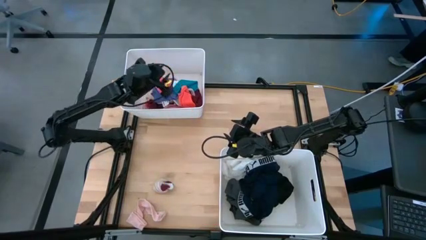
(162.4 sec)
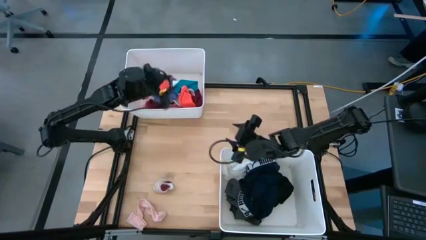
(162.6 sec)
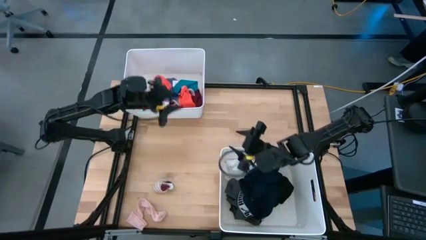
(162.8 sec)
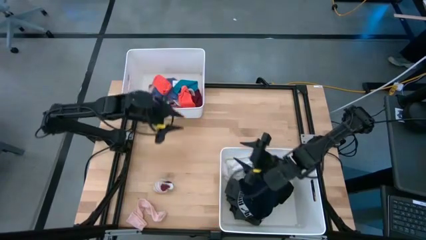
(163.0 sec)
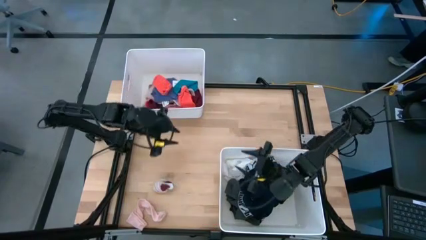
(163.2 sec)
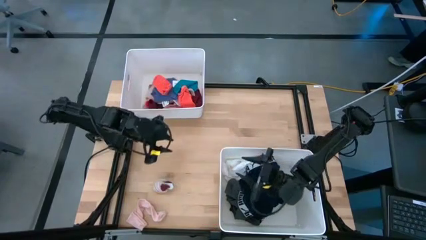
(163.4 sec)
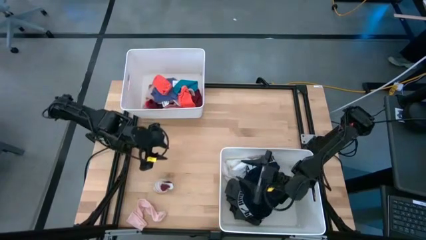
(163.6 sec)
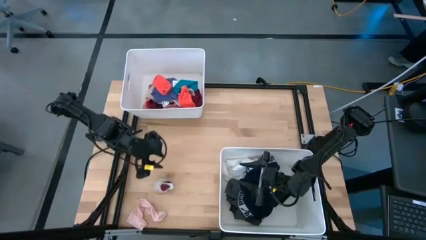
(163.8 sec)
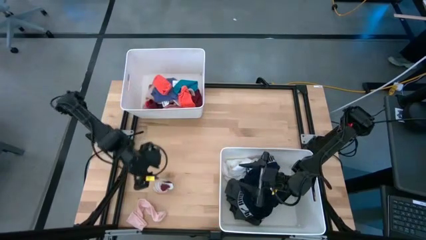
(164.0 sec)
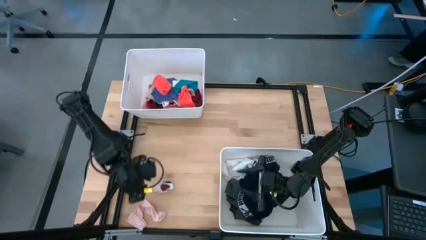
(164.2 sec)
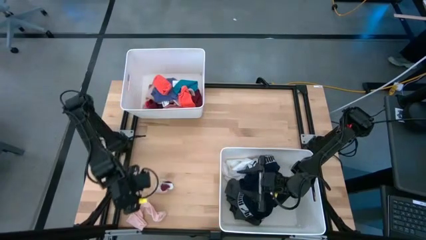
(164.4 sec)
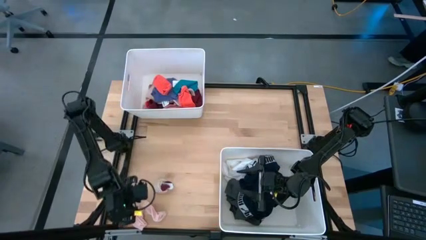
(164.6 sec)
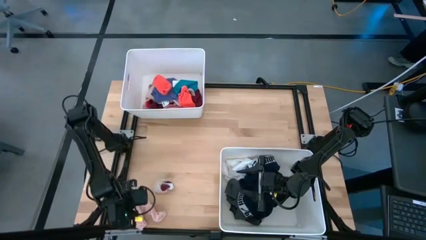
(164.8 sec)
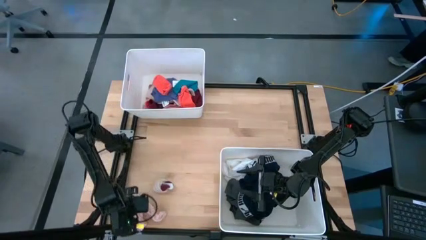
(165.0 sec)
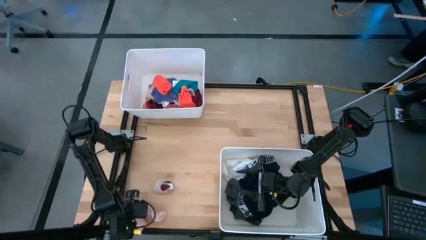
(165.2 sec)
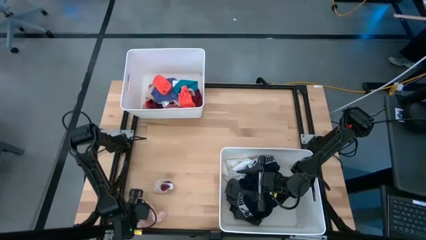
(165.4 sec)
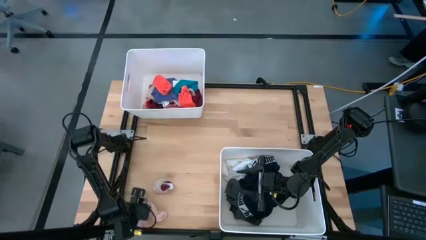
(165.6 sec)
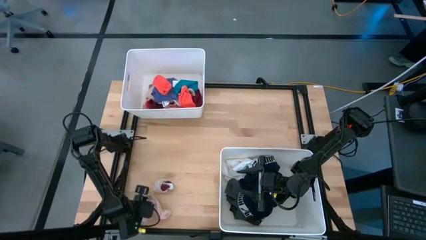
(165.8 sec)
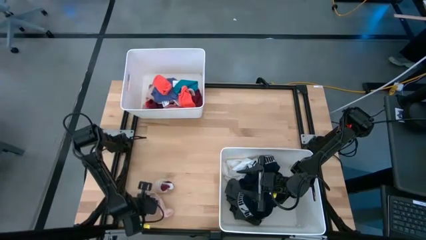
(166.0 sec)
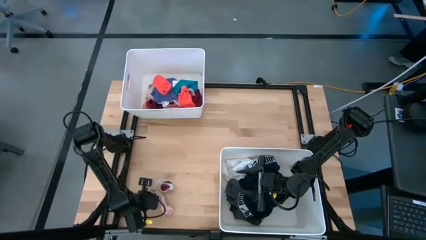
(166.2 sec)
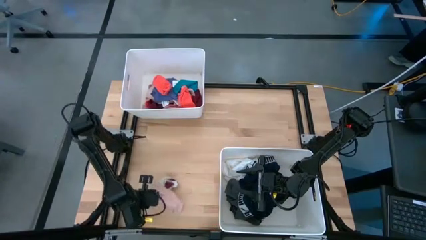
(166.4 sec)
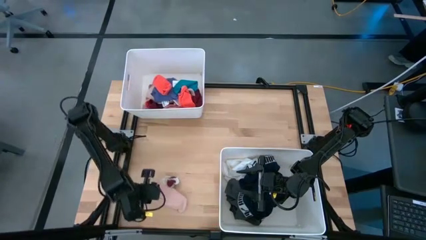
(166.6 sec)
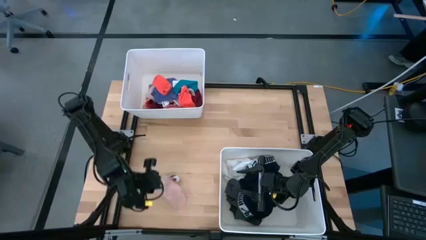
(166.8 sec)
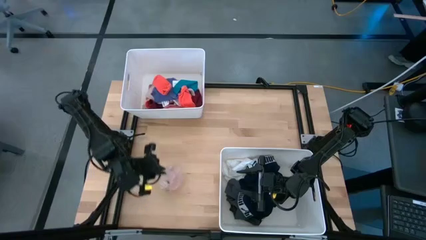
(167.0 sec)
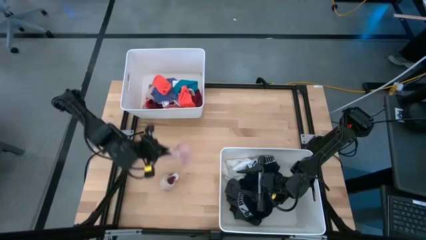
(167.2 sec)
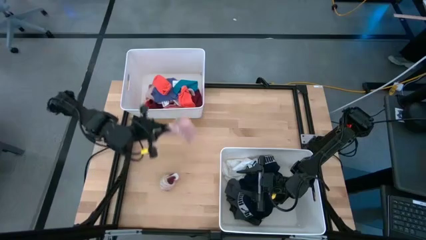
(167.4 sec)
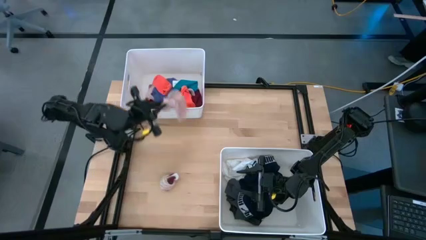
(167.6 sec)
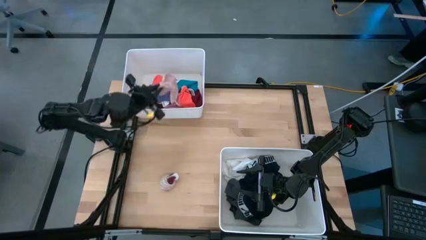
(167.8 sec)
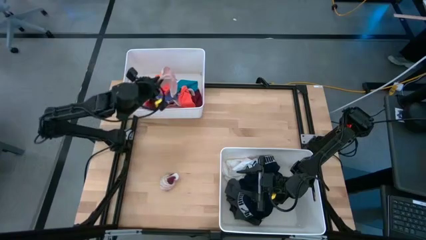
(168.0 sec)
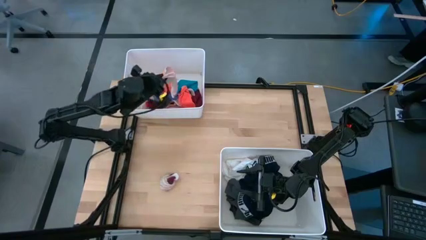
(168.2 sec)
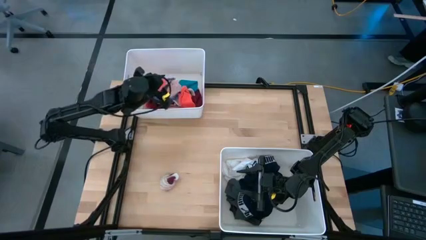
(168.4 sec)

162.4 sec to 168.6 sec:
Task: Sort clothes
Put the pink sock into the top white bin

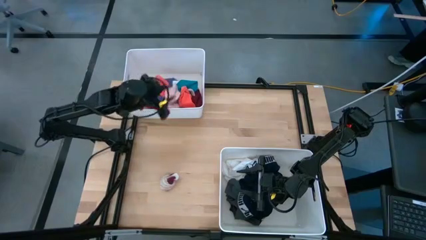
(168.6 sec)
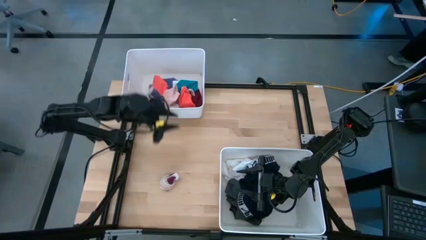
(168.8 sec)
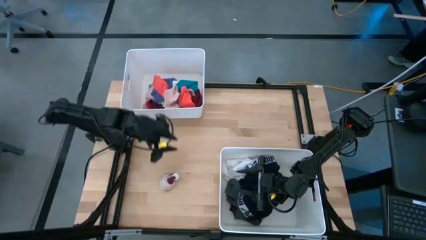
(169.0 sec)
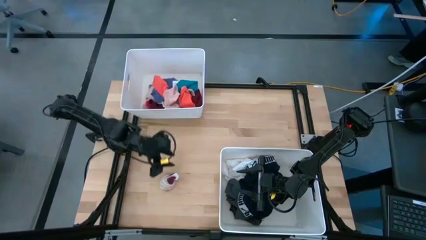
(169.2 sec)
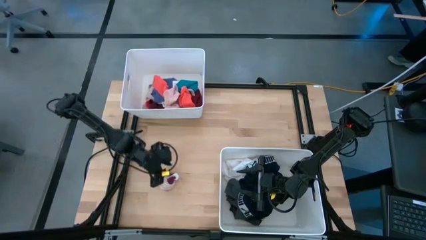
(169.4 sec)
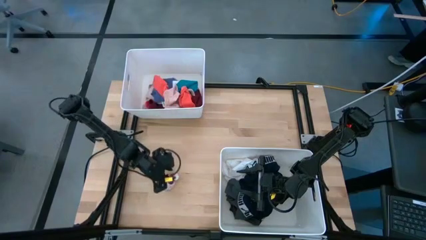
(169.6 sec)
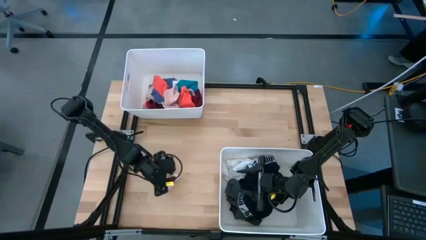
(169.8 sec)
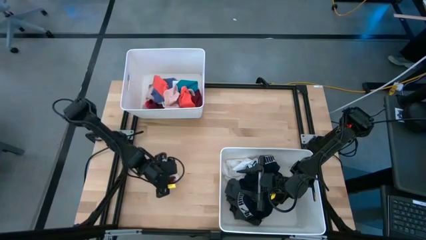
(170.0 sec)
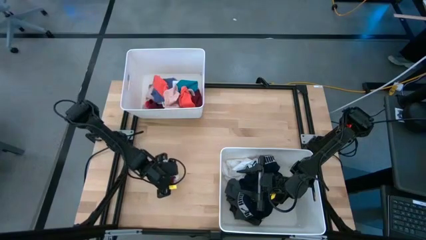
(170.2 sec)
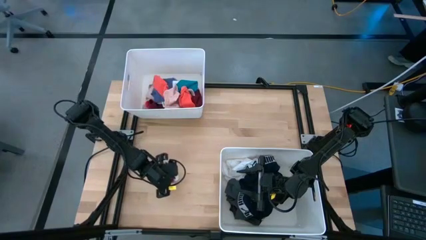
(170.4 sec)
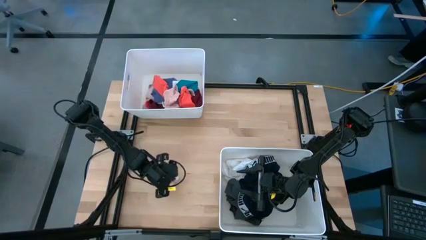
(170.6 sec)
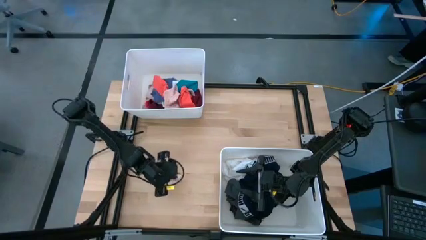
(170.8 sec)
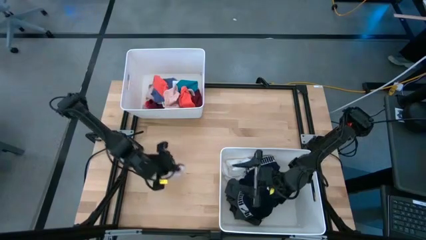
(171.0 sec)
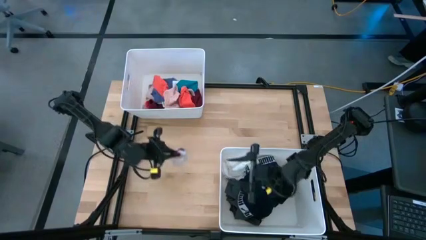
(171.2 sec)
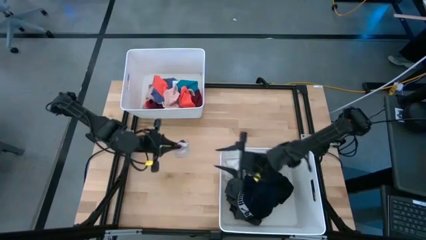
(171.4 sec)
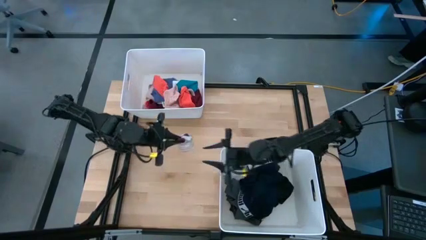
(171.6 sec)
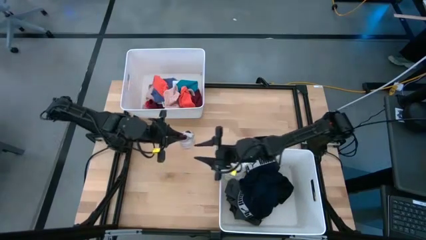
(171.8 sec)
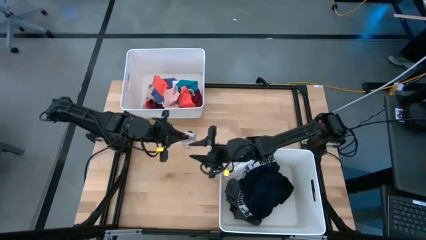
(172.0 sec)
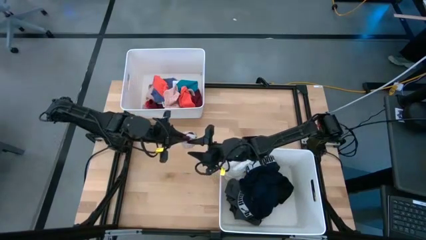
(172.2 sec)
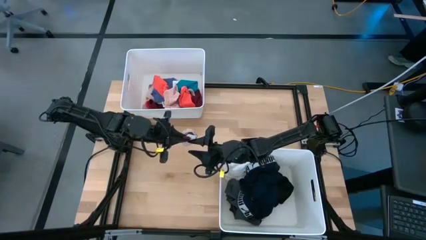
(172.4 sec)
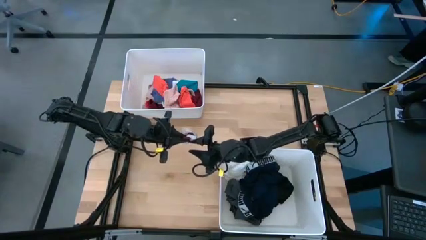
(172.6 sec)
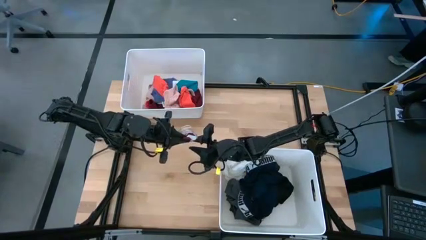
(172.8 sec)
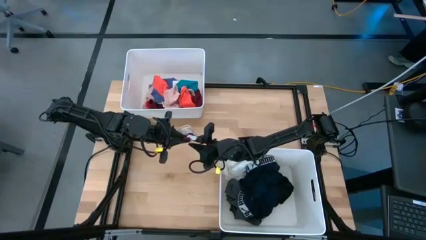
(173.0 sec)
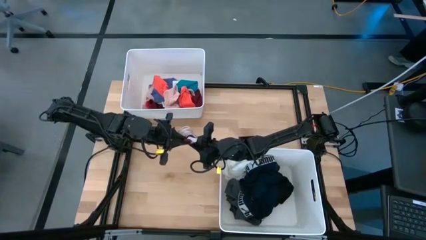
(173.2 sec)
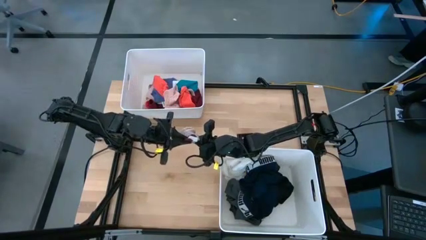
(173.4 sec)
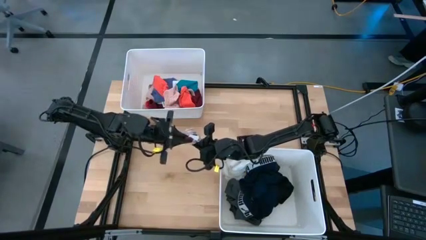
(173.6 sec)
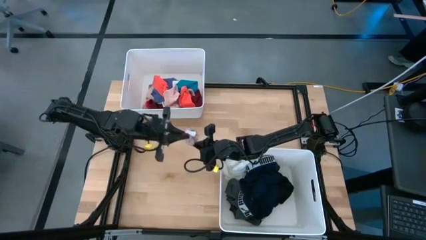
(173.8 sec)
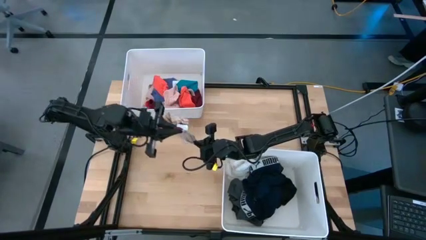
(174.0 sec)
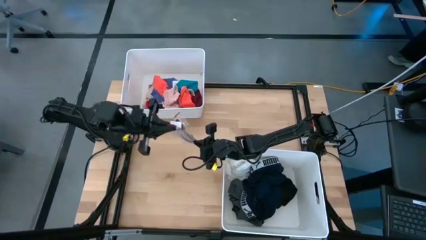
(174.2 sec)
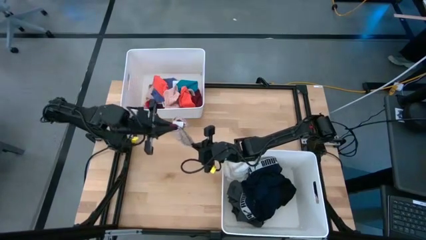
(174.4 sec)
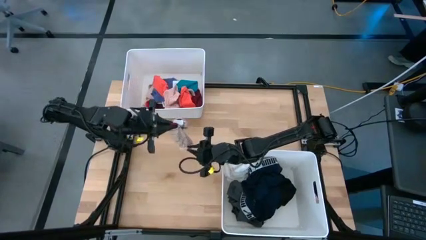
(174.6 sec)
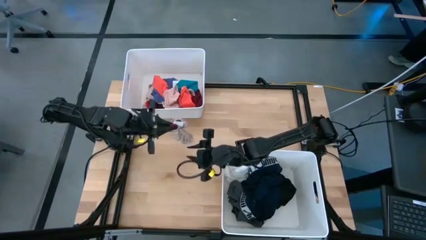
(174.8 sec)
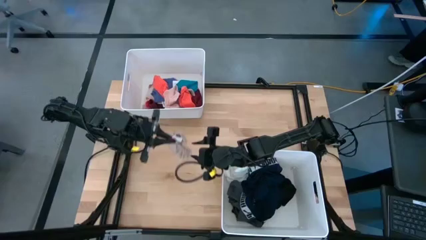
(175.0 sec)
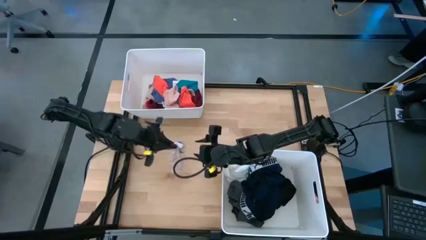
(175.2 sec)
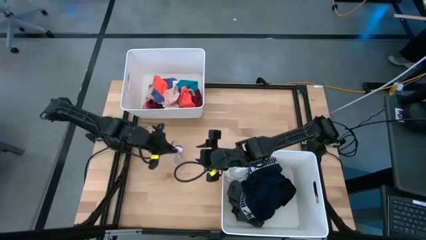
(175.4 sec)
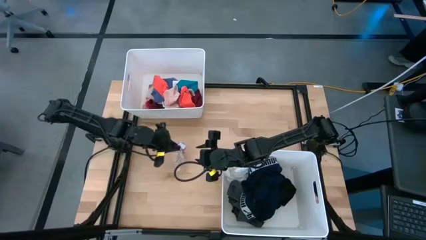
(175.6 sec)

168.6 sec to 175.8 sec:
Put the white striped sock into the top white bin

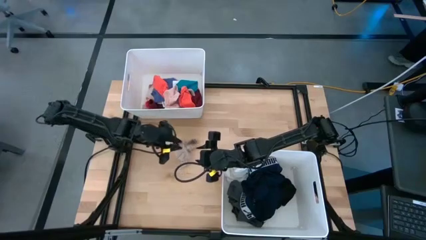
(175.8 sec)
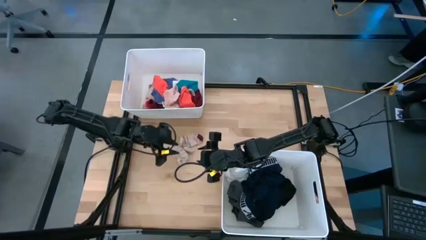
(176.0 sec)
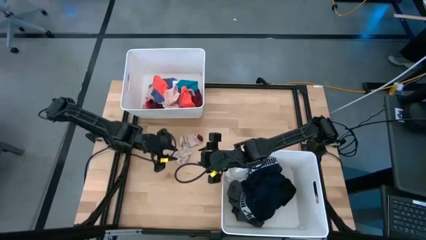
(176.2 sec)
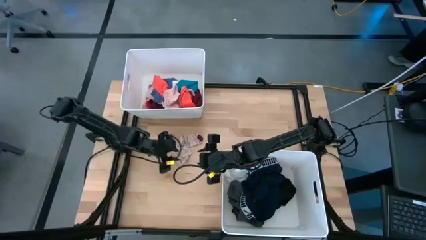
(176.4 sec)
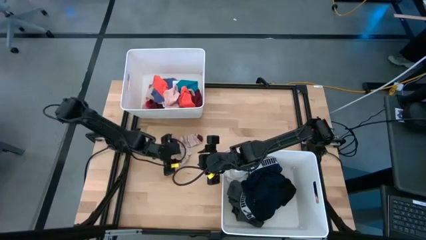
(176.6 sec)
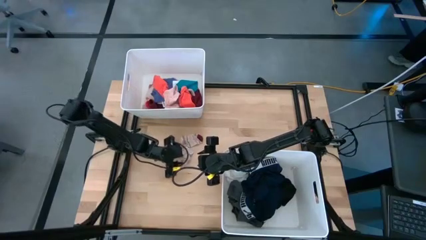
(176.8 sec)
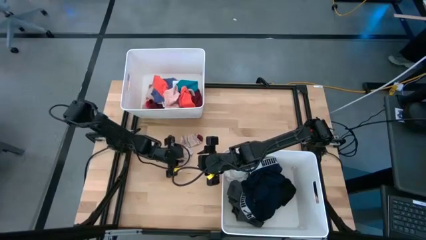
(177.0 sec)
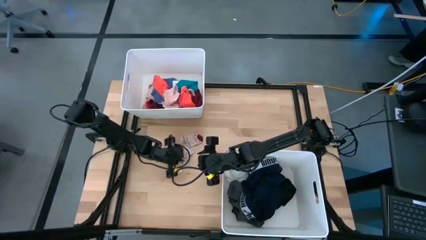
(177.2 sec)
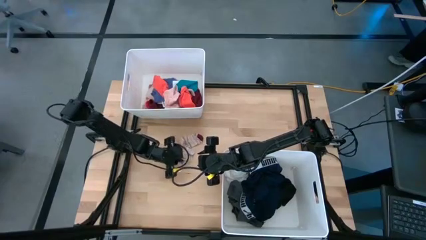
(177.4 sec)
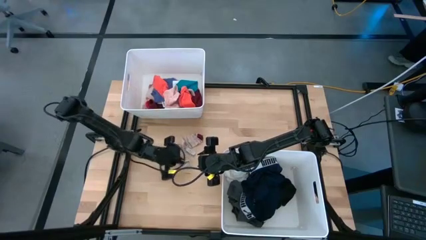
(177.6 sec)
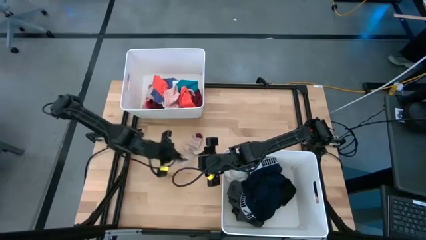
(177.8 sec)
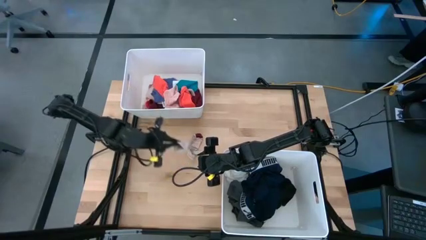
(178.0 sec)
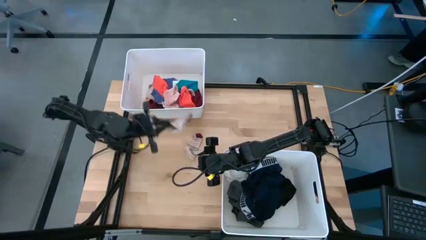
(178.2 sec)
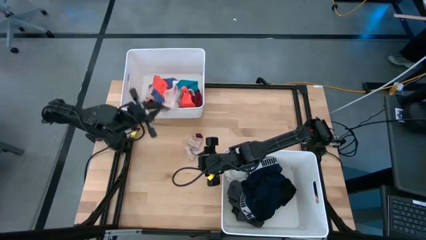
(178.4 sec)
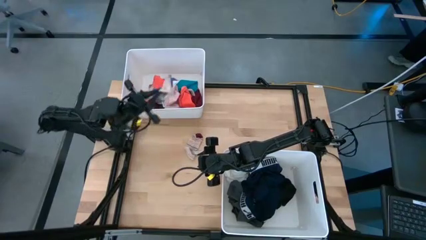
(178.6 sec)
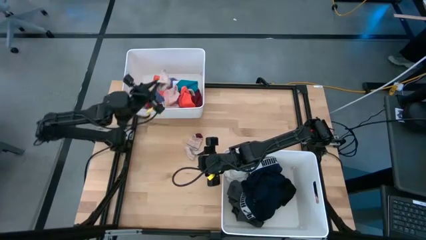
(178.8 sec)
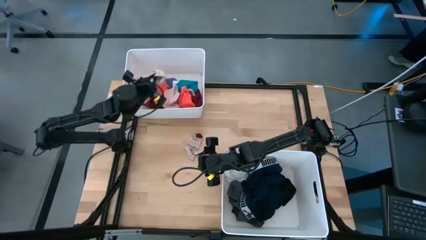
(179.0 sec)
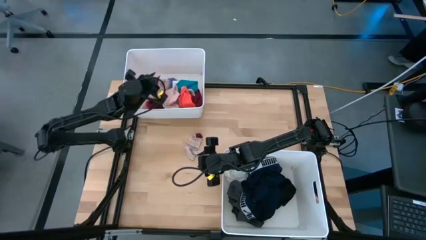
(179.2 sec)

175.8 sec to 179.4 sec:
Put the white striped sock into the top white bin
